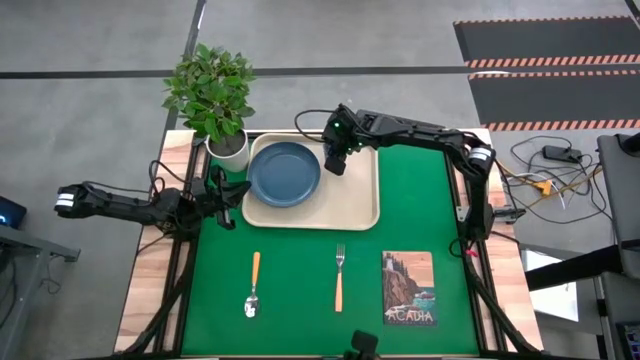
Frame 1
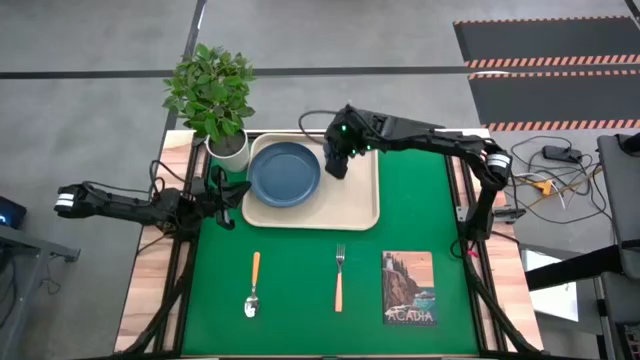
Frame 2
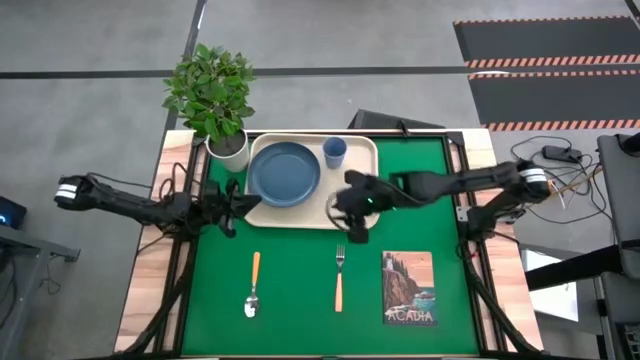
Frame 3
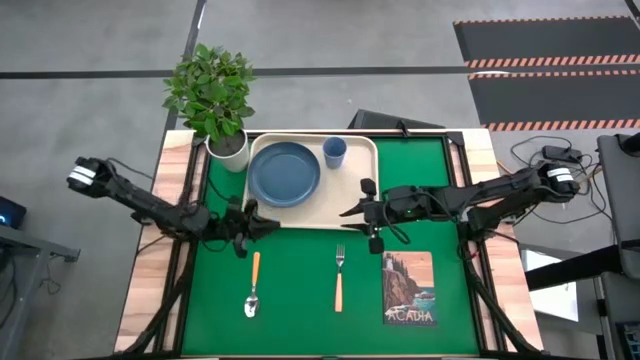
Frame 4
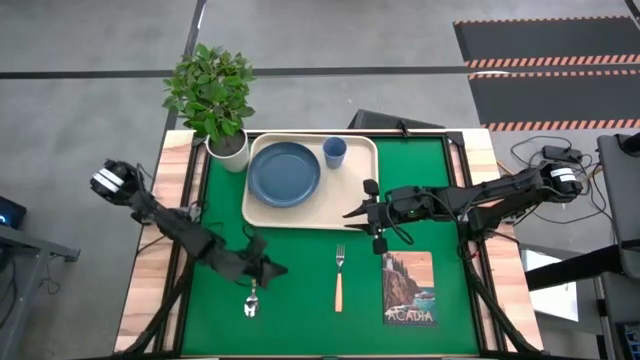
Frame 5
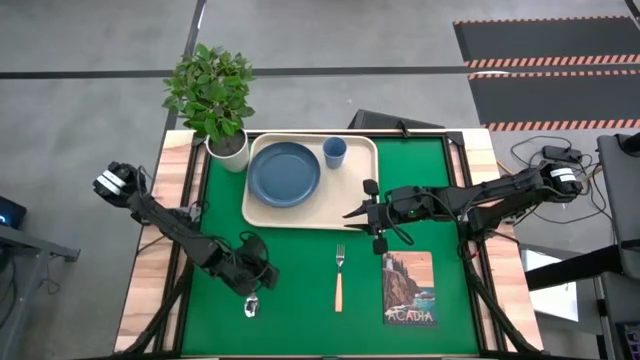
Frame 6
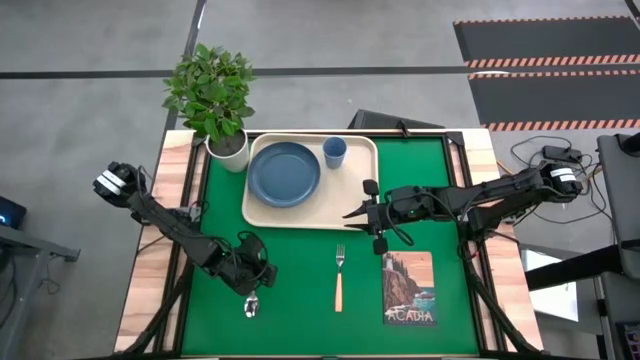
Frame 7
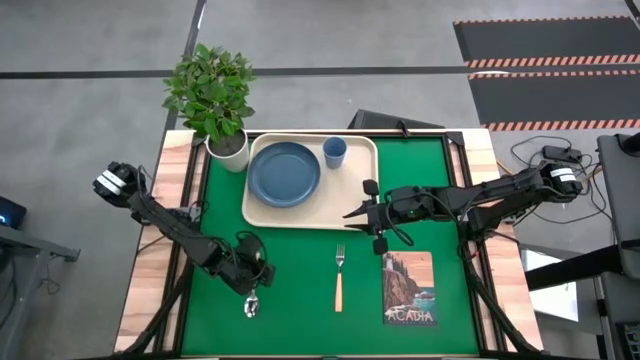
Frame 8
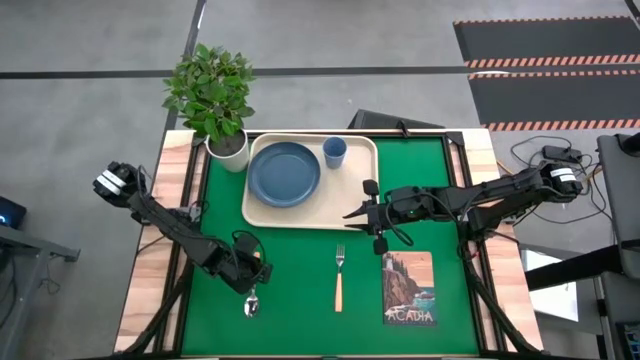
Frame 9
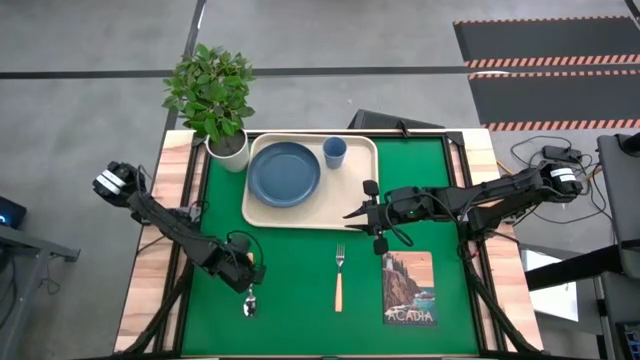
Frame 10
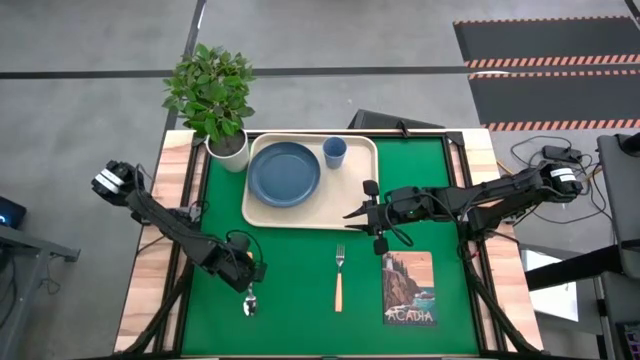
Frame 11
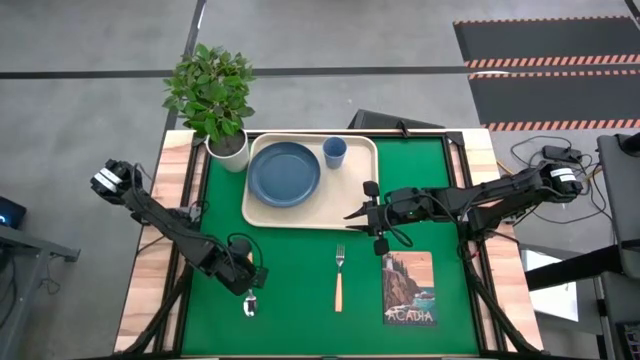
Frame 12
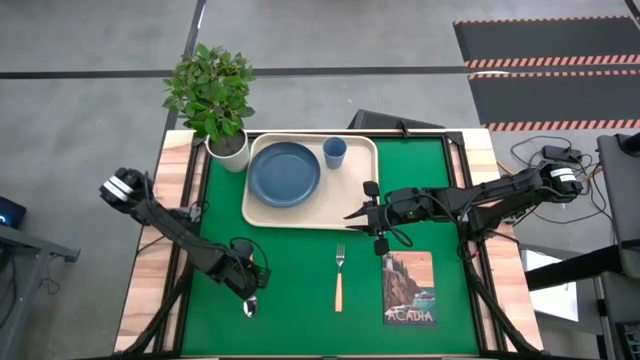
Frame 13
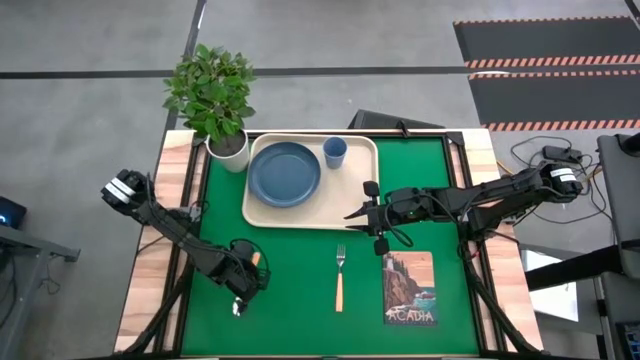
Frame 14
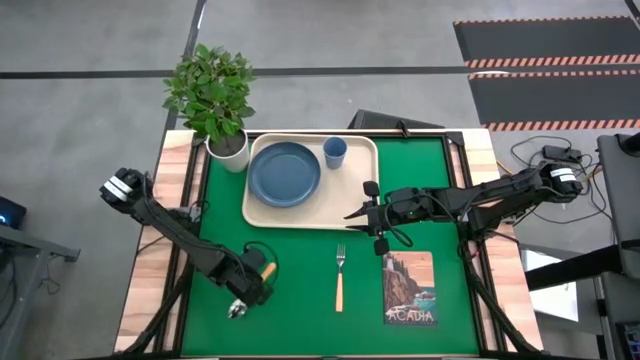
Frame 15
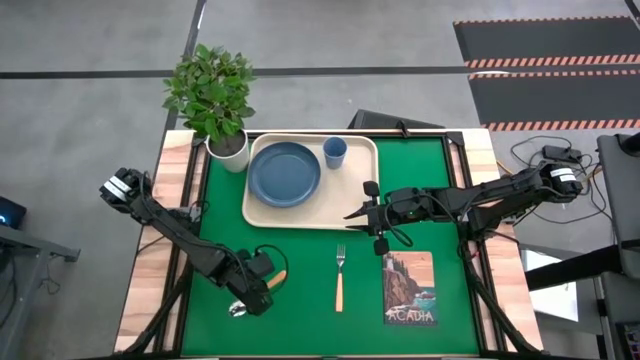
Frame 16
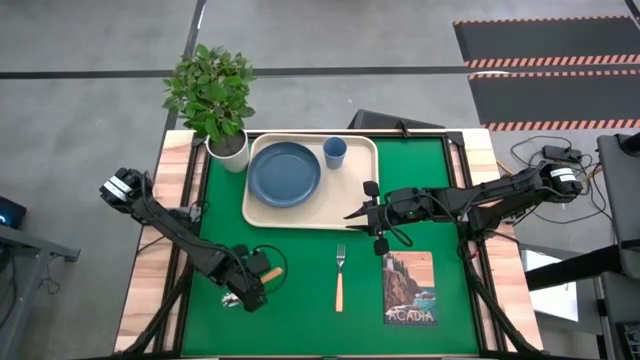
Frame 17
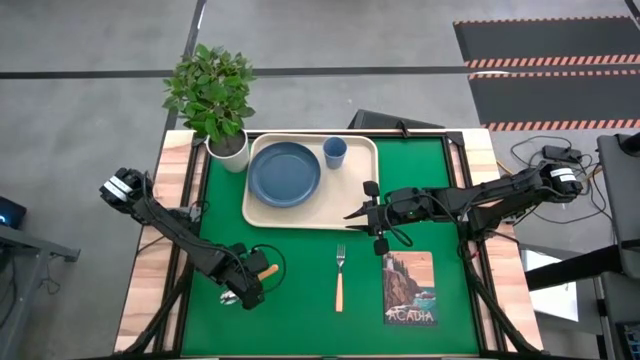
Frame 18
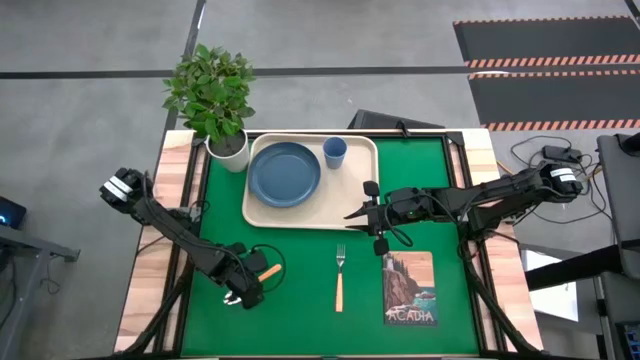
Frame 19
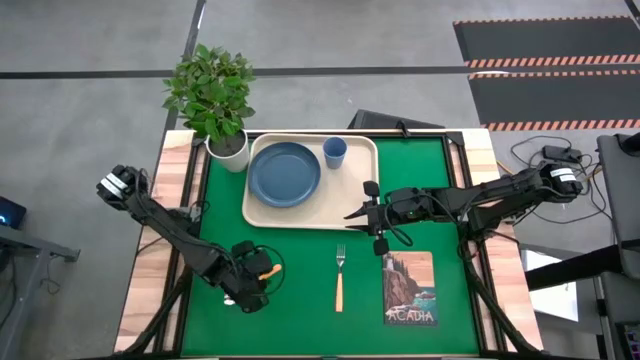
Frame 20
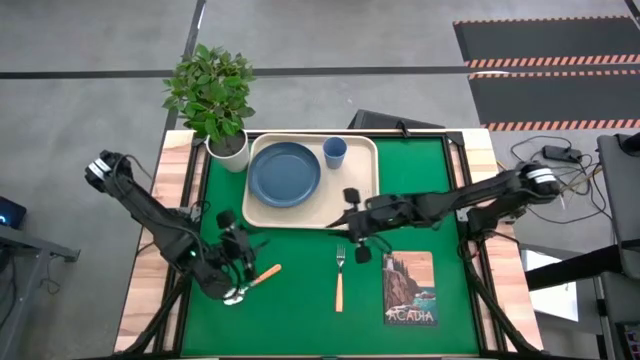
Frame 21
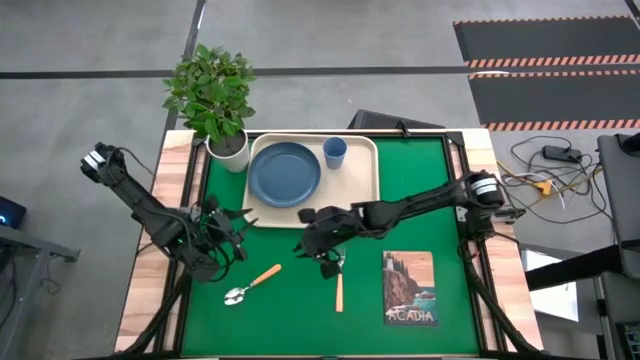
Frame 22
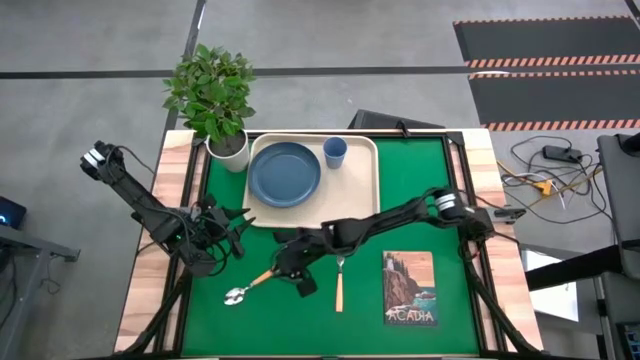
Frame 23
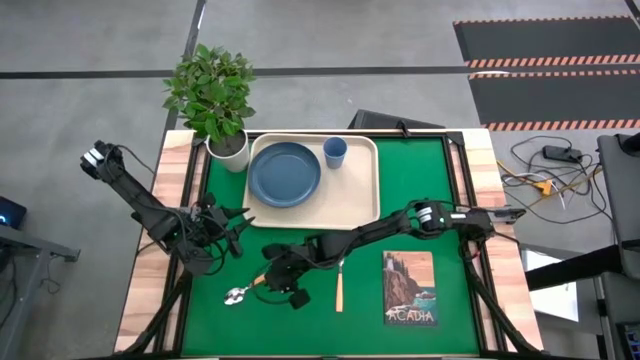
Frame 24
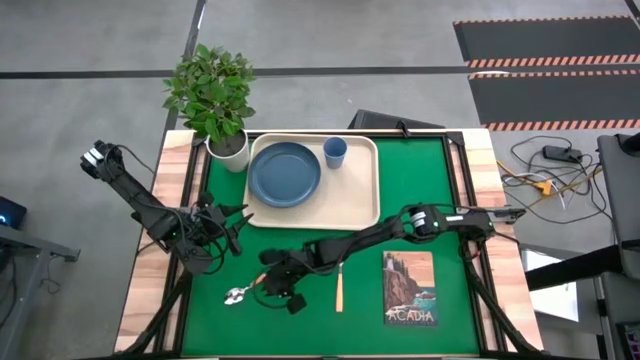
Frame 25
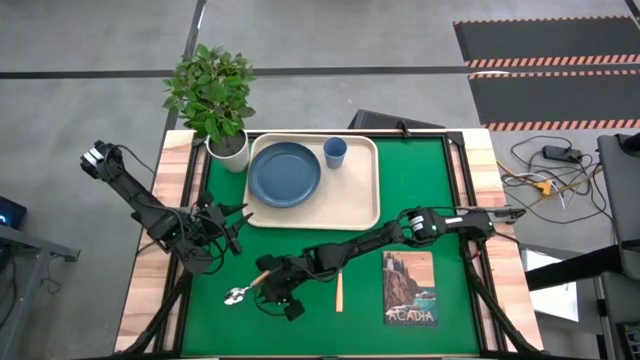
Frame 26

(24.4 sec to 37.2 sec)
Task: Pick and place plate/cup/fork/spoon on tray
Put the yellow spoon on the white serving tray to the right of the blue plate

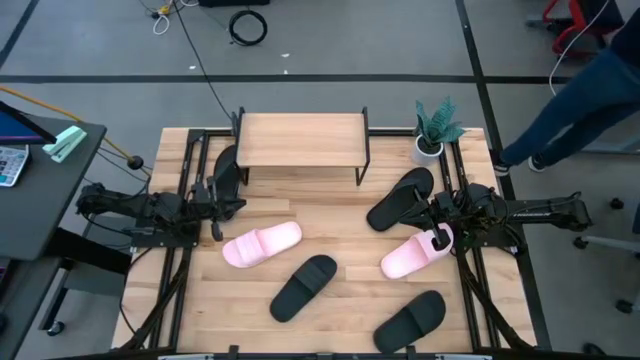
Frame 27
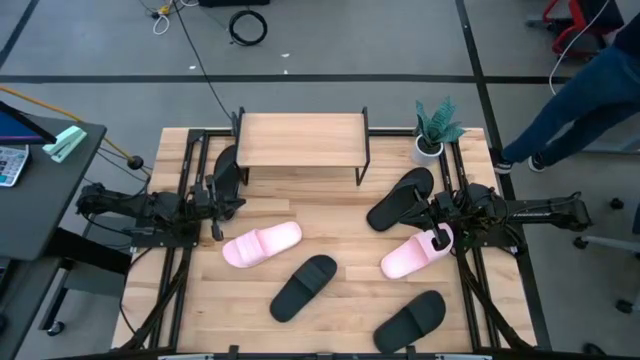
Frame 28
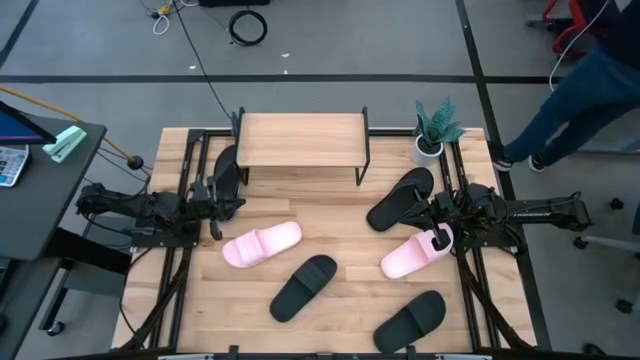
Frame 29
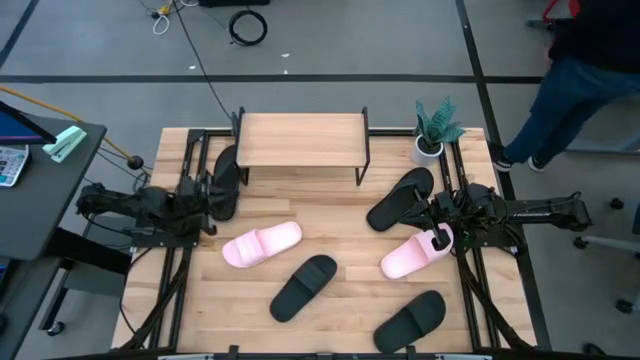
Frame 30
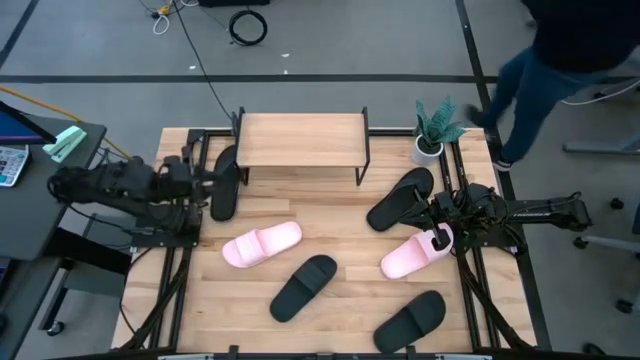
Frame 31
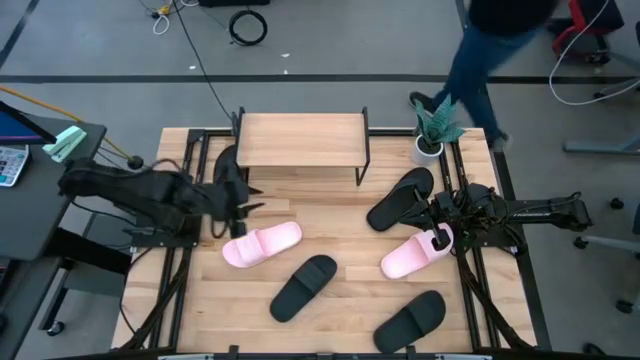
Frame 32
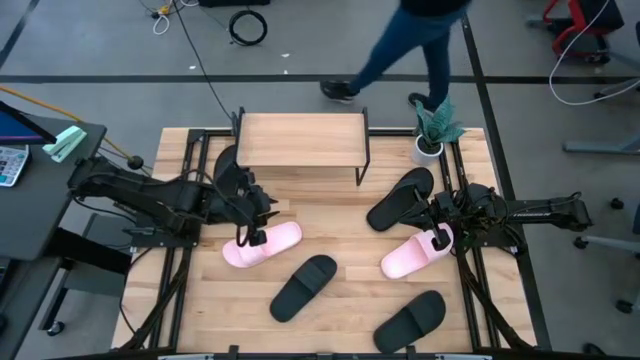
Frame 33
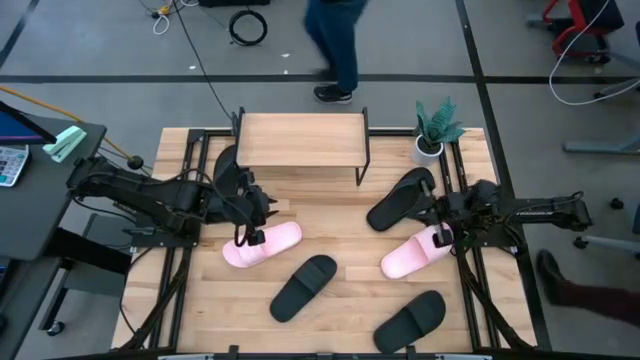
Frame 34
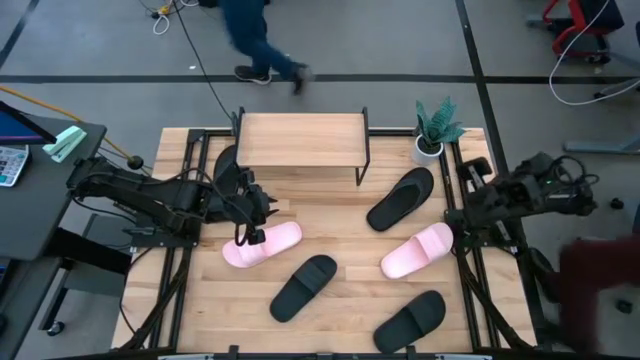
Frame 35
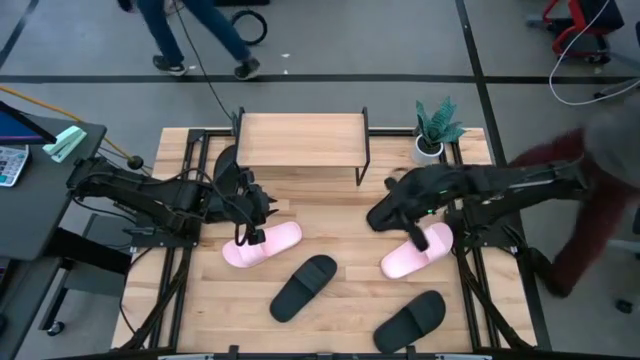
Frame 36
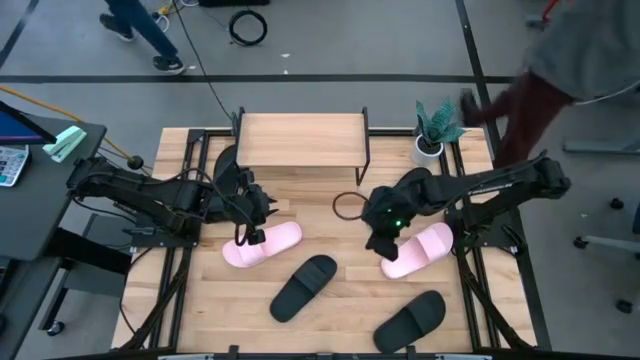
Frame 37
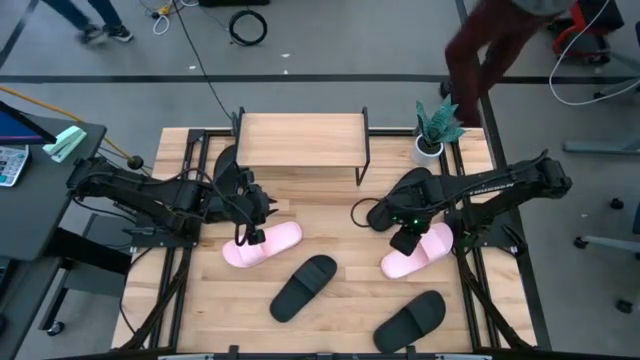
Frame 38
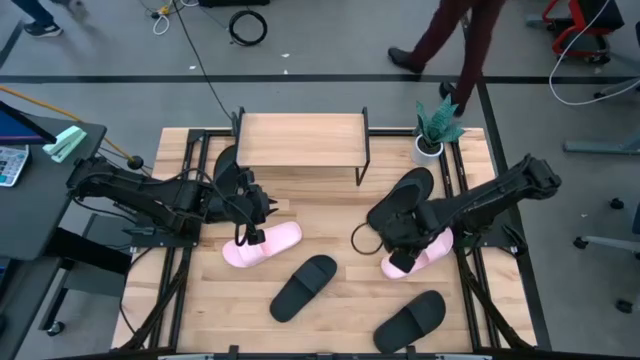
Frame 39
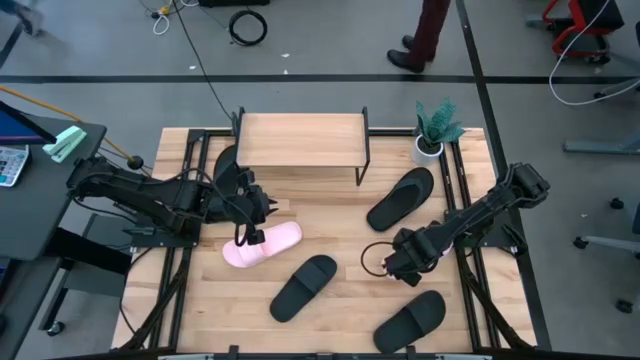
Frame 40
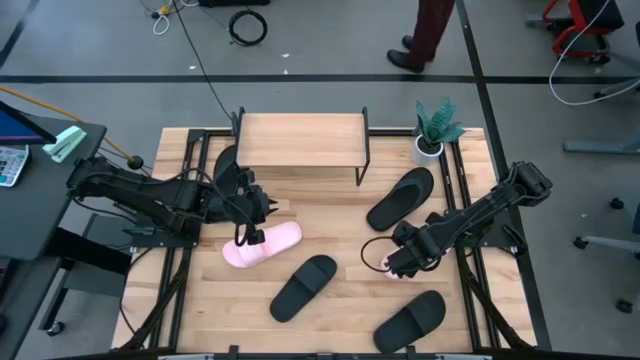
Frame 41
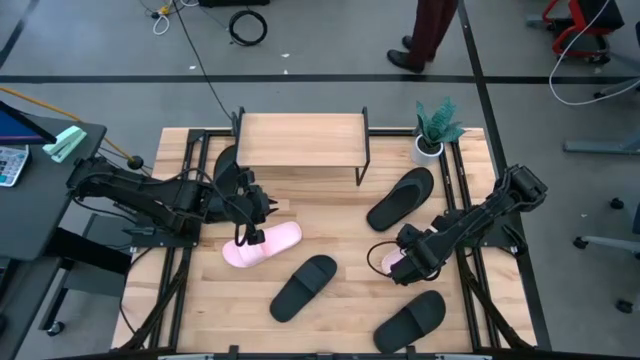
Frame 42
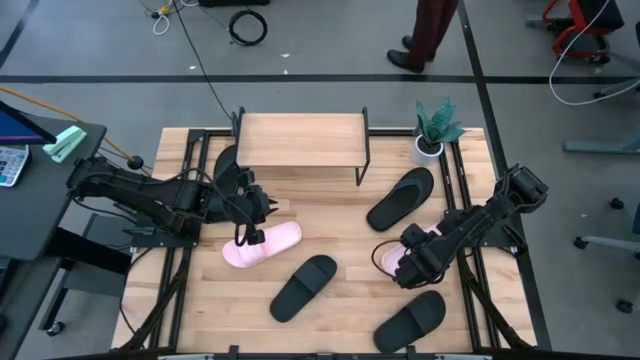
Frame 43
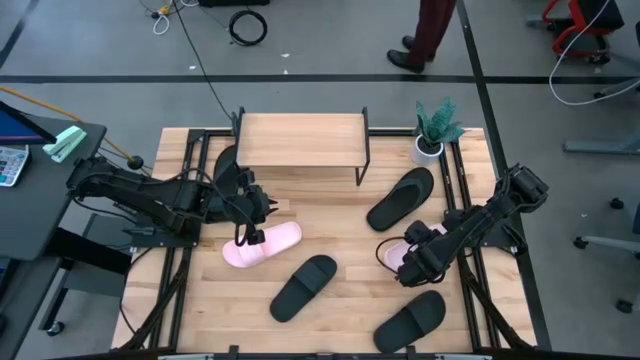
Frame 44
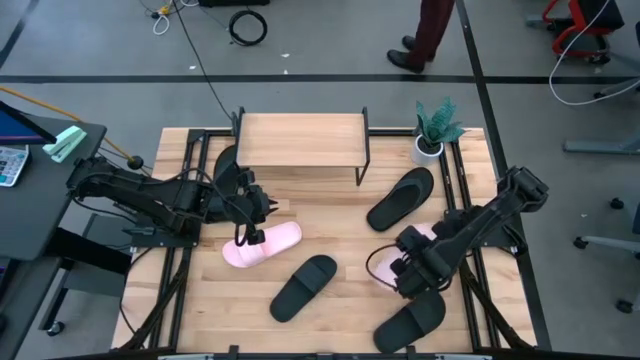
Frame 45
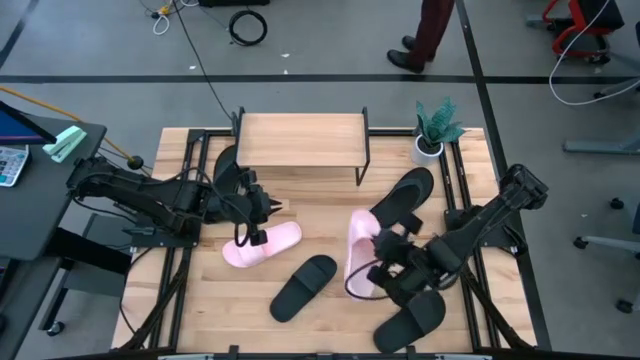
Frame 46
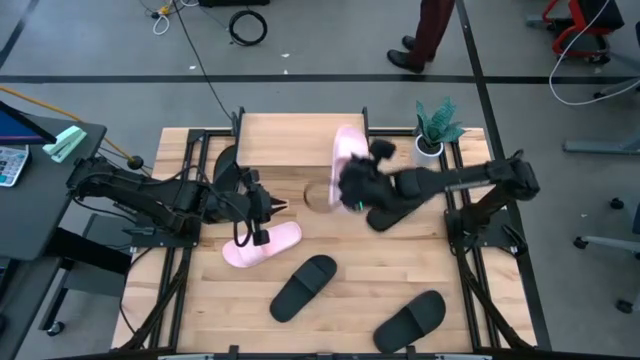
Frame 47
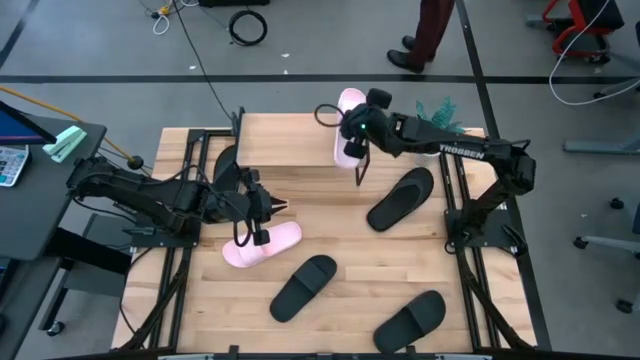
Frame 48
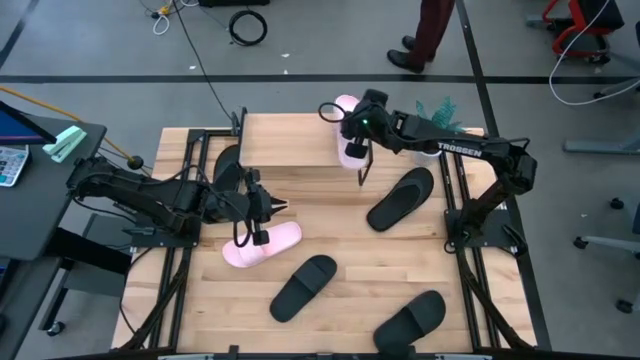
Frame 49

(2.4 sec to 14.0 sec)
Task: Pick and place slides into the shelf
Put the right pink slide on the shelf
